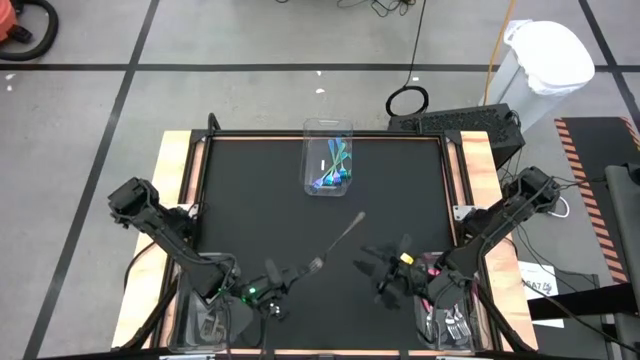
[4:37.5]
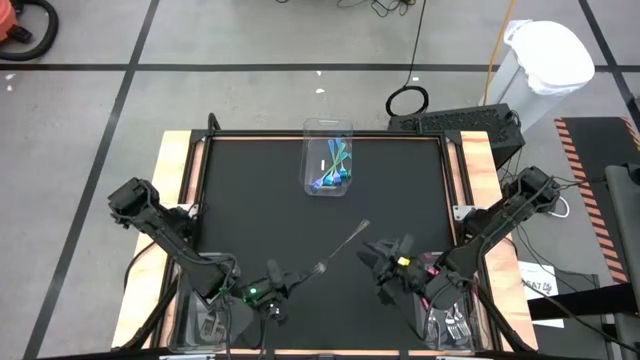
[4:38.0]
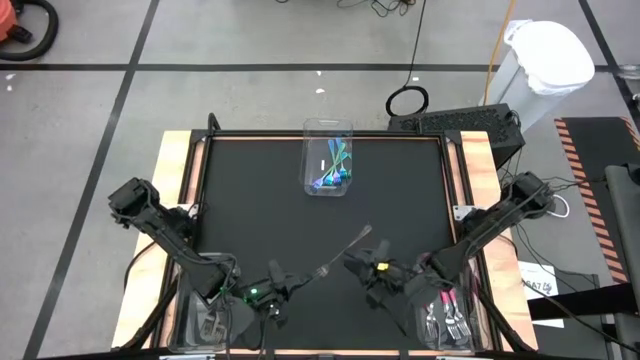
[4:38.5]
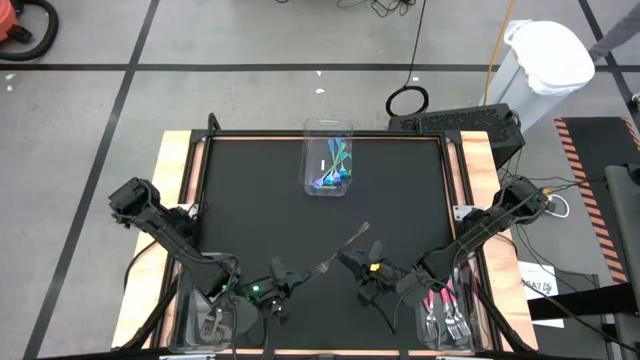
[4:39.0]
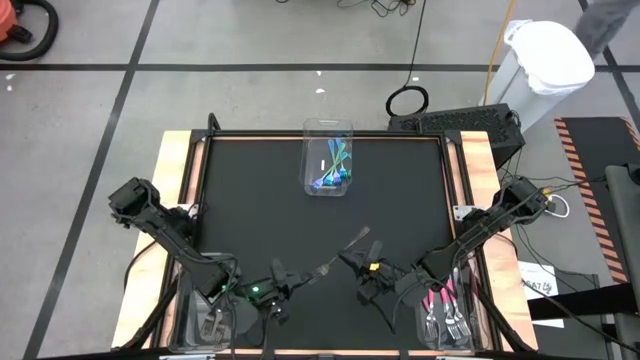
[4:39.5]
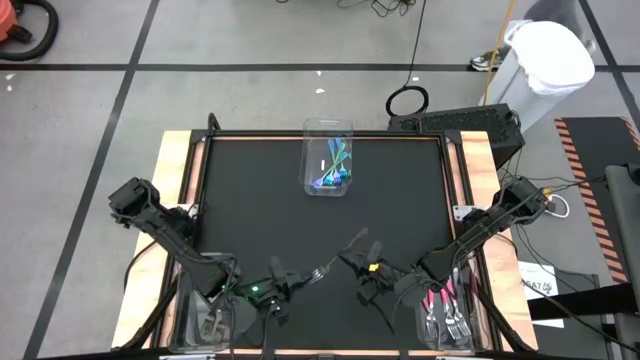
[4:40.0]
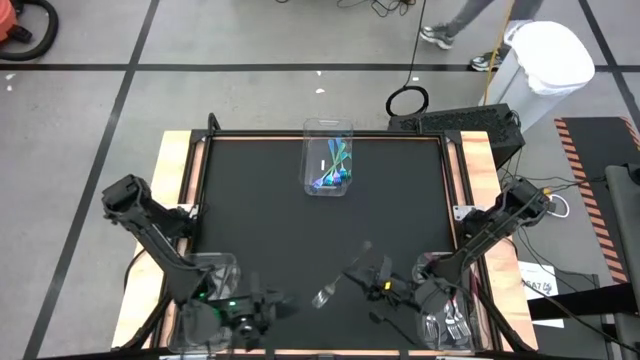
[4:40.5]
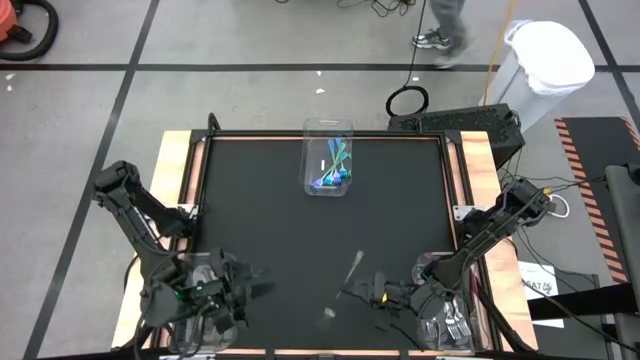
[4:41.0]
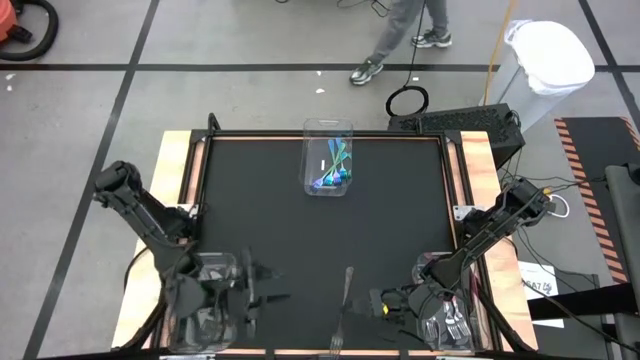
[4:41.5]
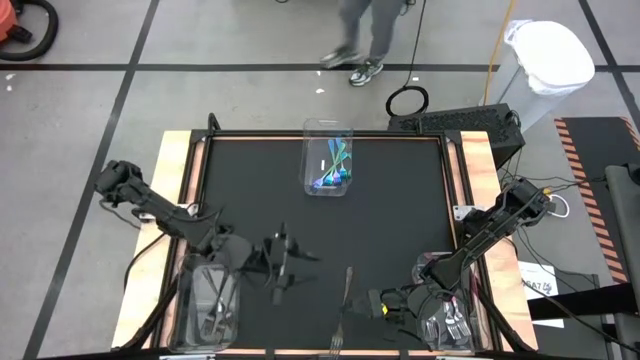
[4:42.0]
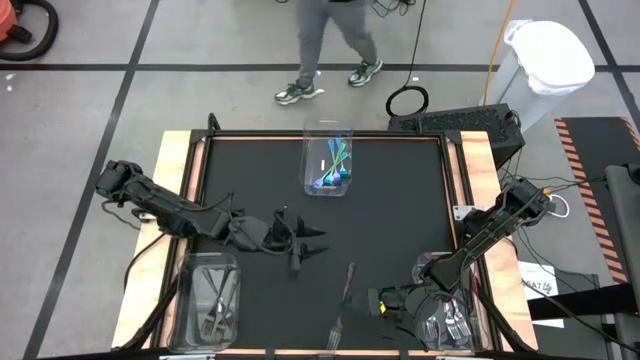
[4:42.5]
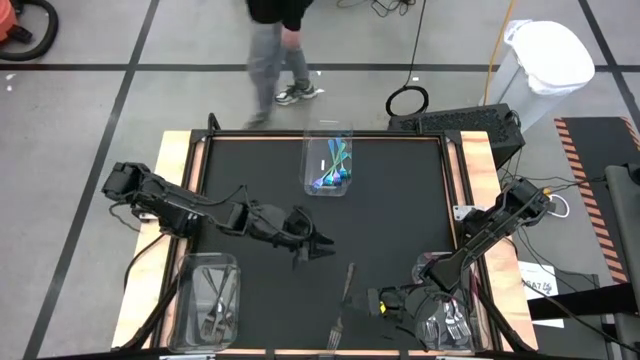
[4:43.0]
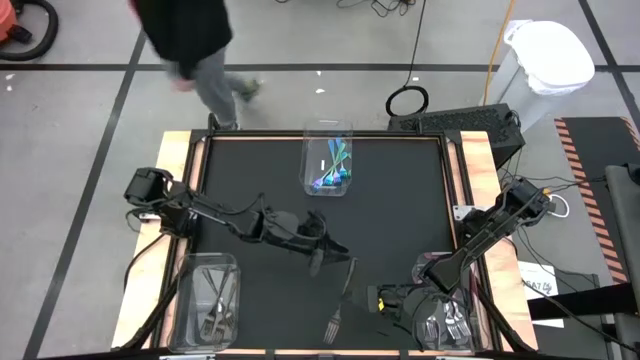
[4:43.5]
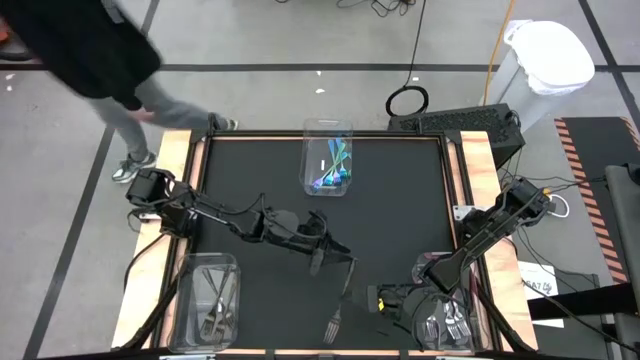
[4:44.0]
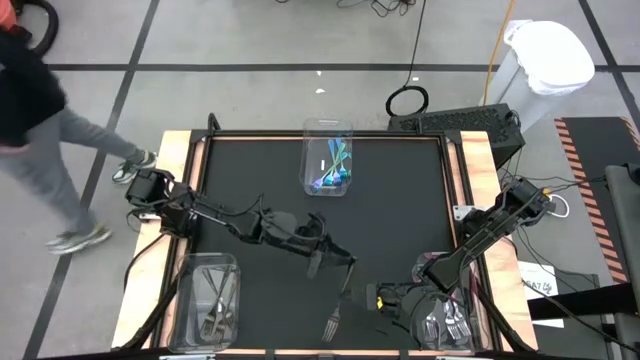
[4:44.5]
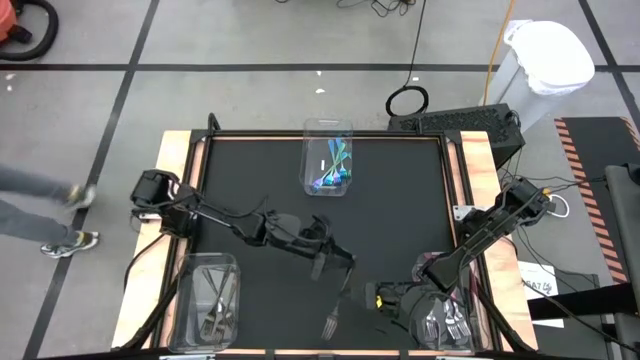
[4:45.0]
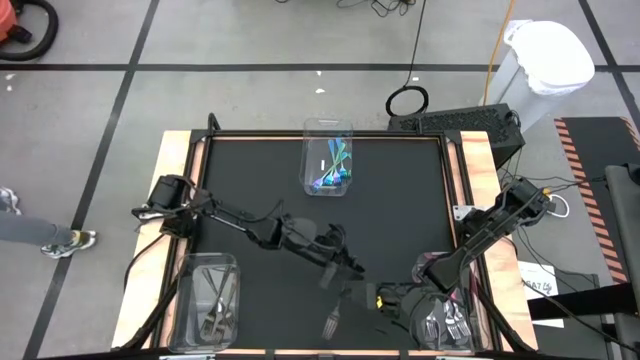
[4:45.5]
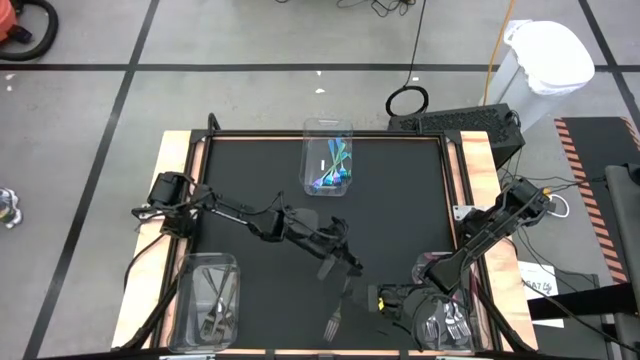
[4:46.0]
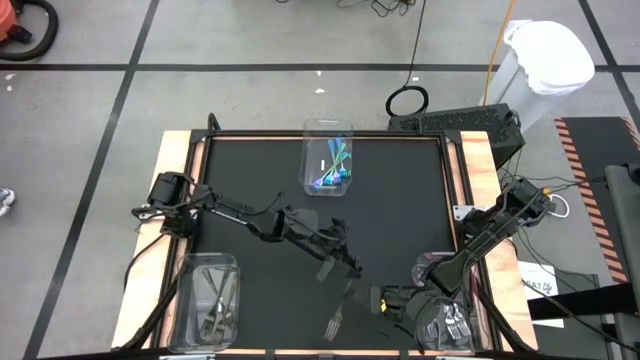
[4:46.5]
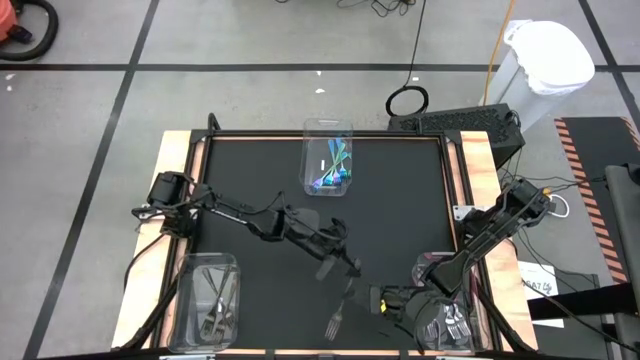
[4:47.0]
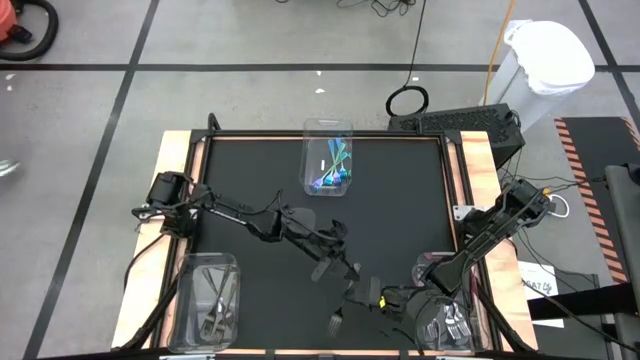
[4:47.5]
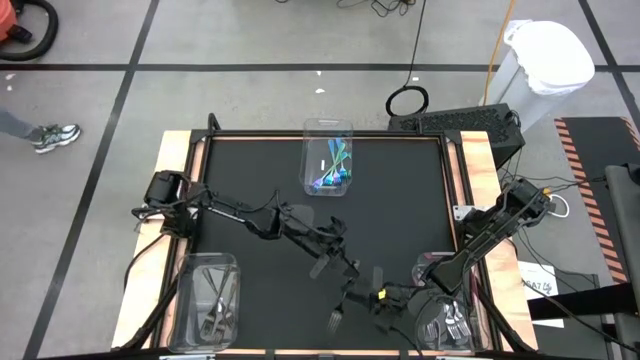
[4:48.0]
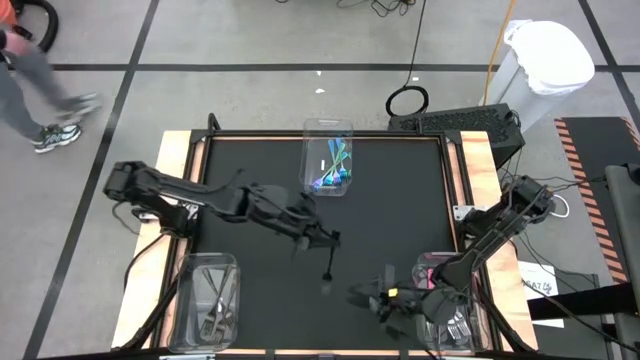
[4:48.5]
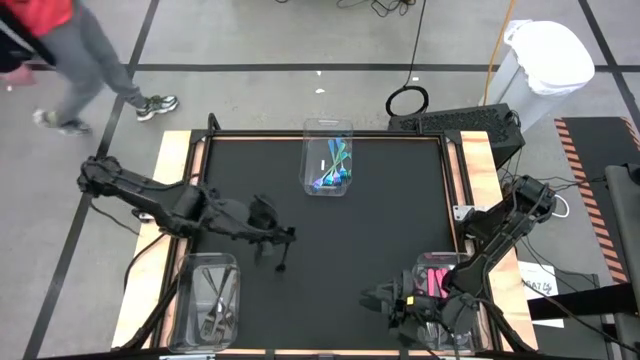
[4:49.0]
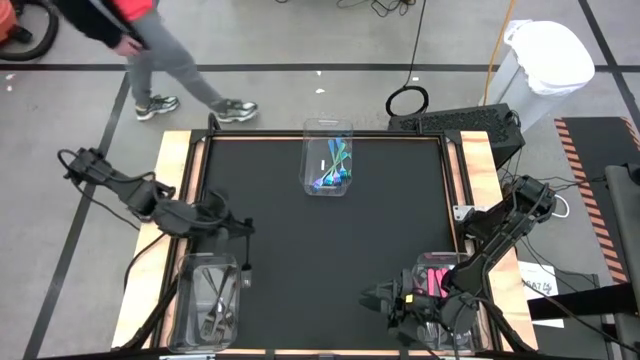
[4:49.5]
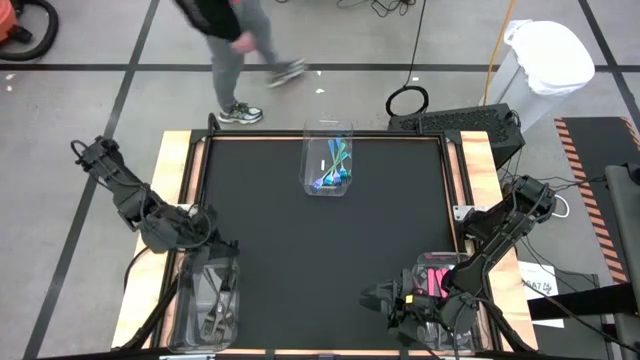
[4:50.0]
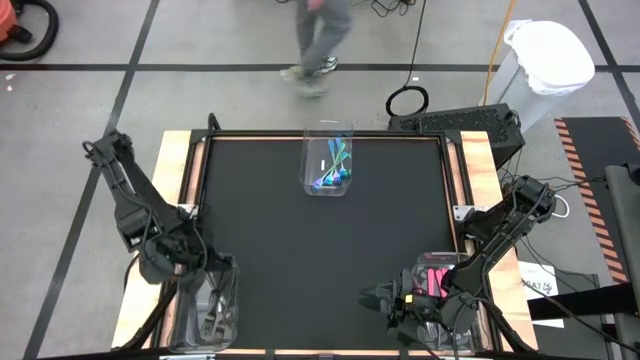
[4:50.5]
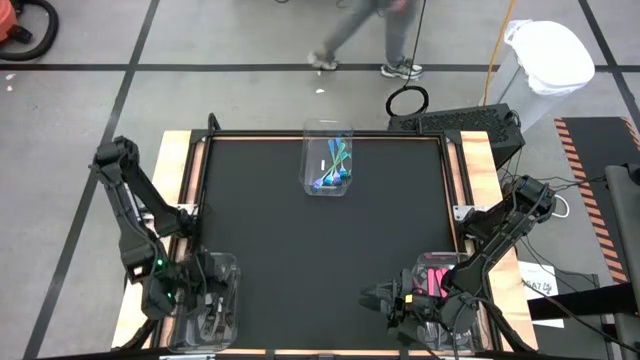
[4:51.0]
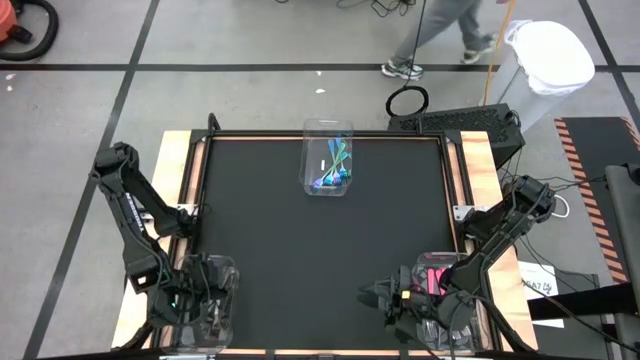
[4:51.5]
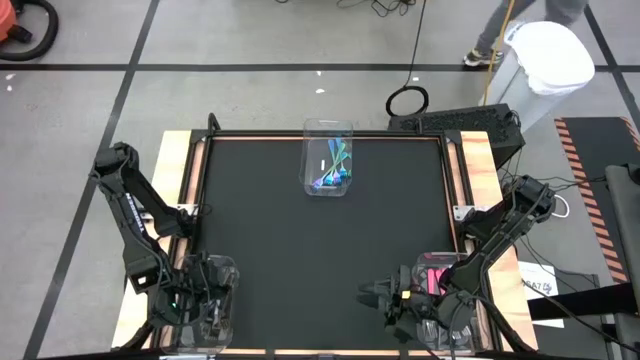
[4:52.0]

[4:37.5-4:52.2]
Task: Sort silverware by color (type)
Put the black fork into the bottom left transparent bin

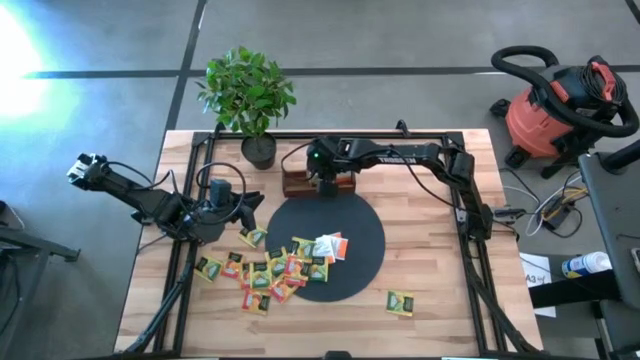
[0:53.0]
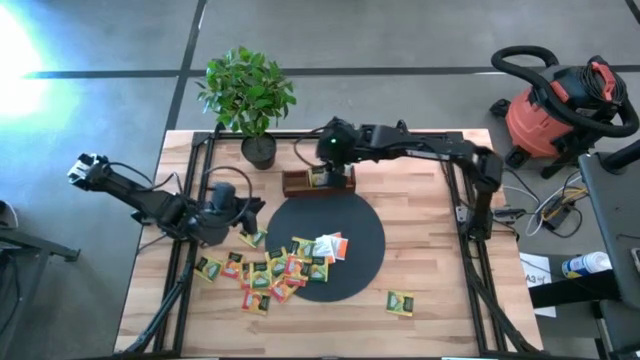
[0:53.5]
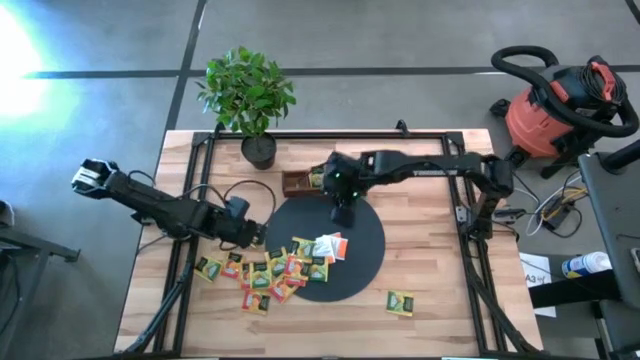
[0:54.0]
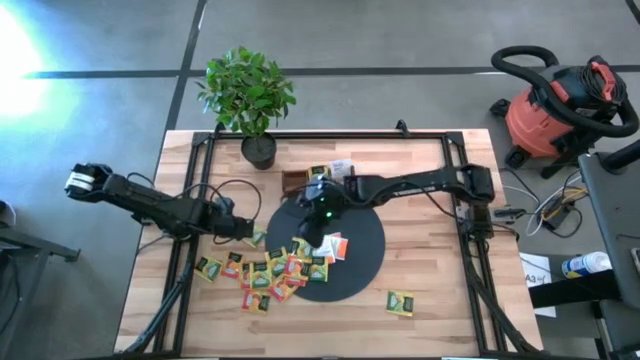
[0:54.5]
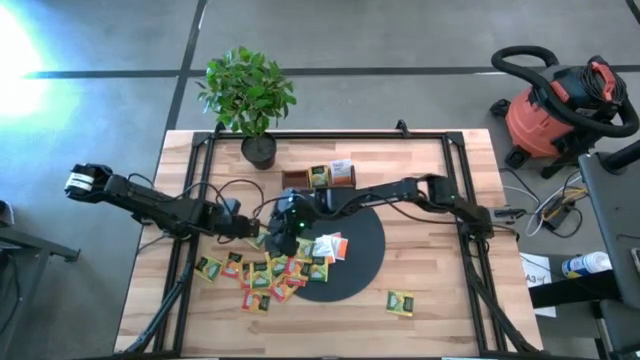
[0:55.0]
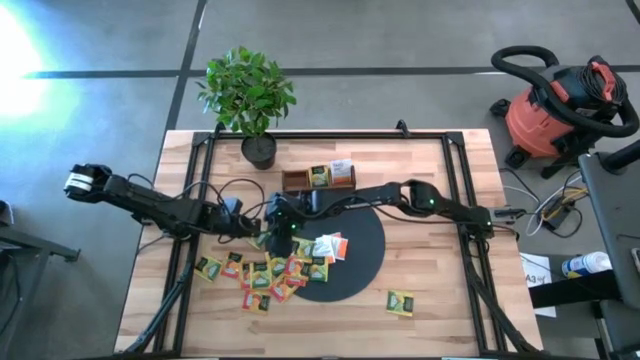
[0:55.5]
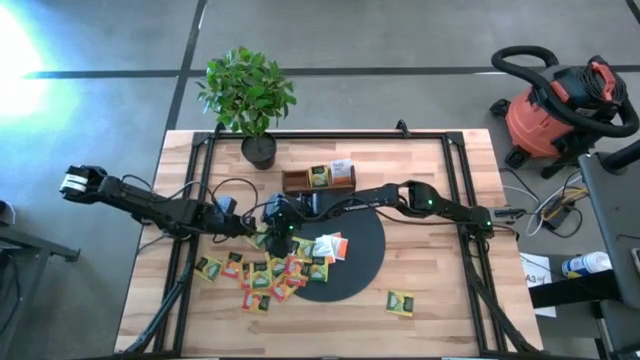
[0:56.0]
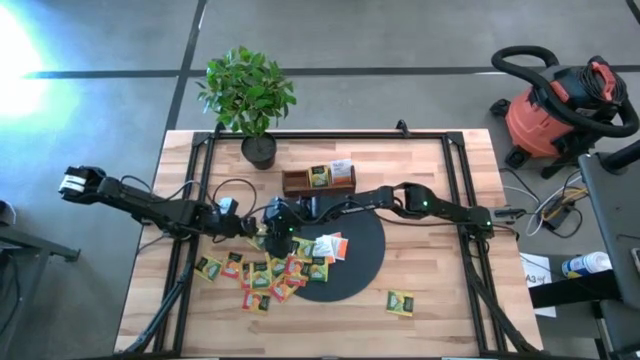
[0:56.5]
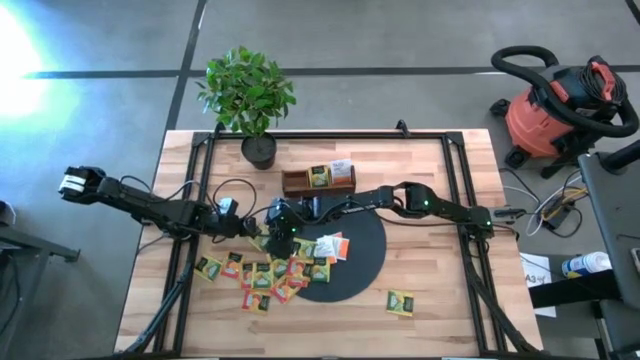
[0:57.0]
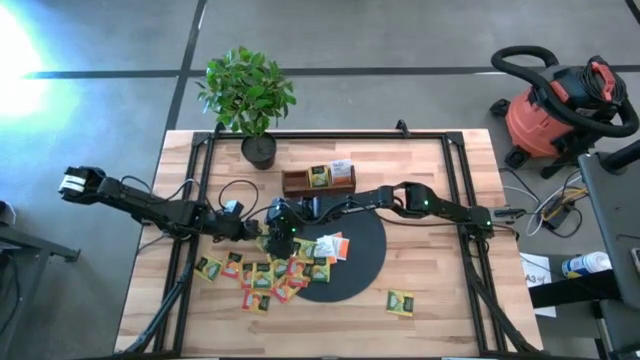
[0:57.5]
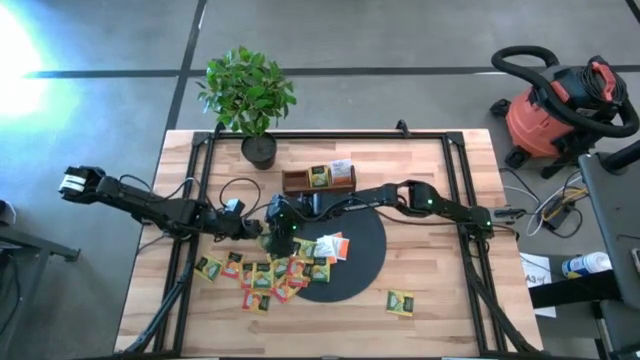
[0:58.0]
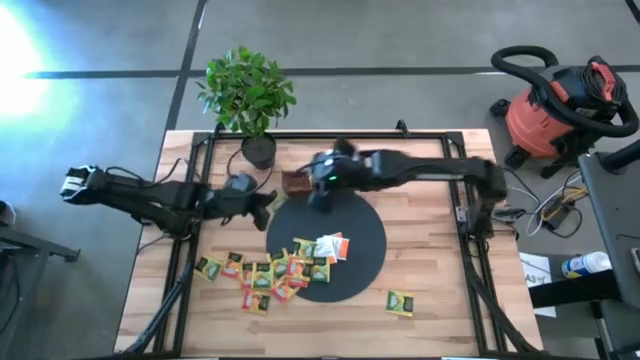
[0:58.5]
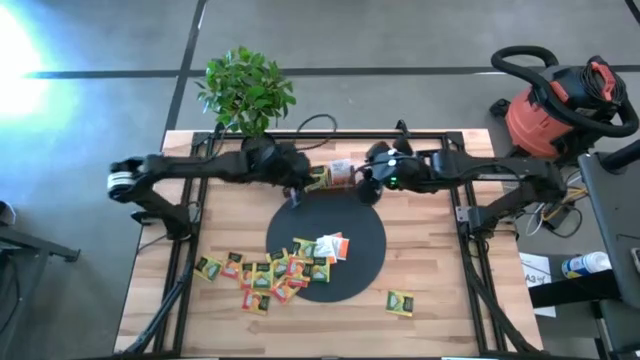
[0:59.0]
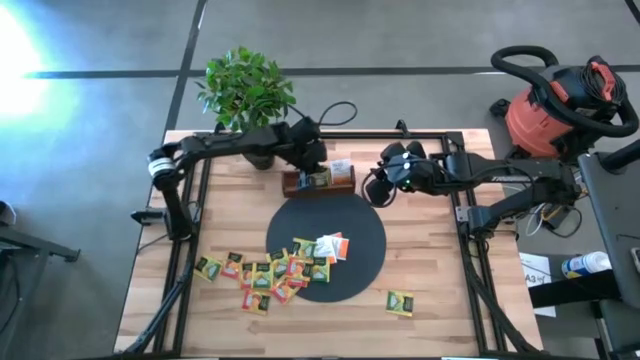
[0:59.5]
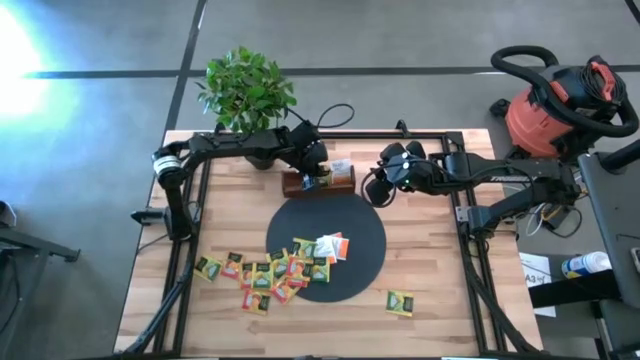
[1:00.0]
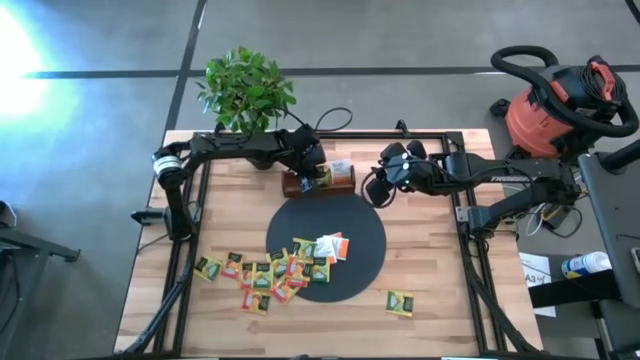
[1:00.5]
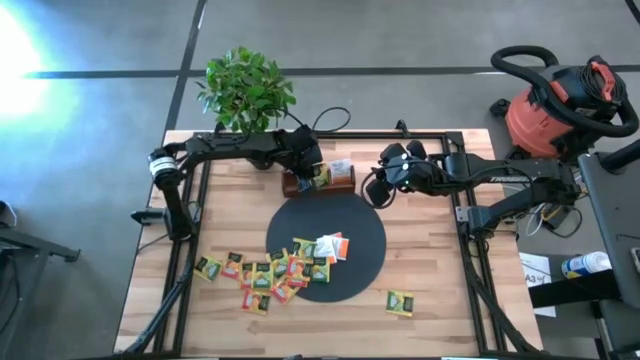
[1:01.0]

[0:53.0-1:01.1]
Task: Pick & Place Tea
Put the yellow tea bag into the middle slot of the wooden organizer
